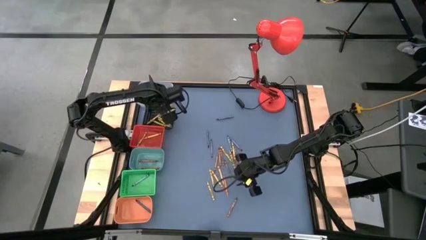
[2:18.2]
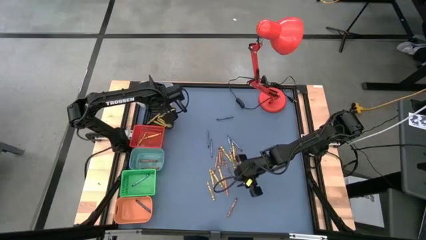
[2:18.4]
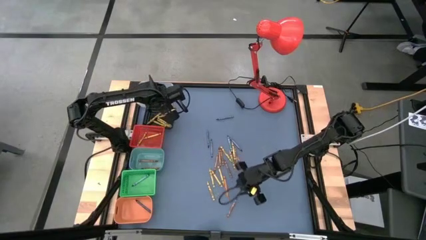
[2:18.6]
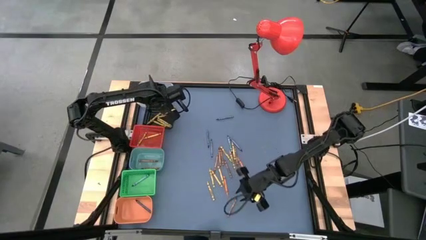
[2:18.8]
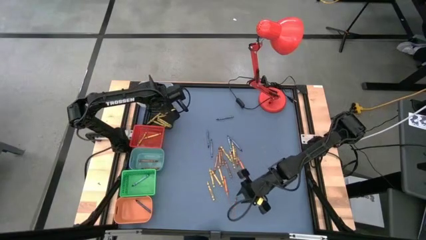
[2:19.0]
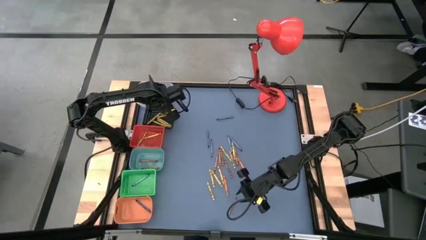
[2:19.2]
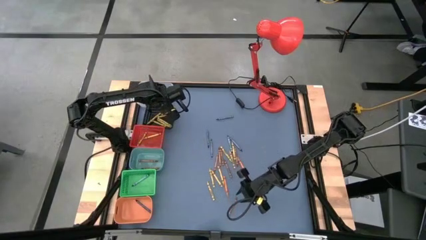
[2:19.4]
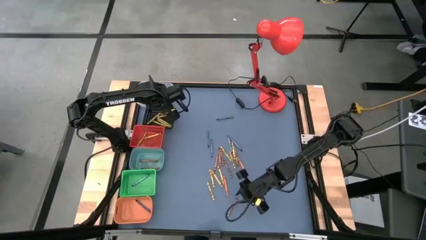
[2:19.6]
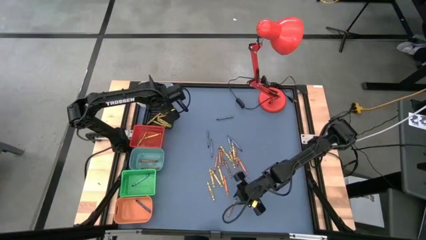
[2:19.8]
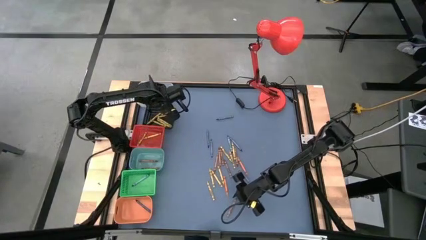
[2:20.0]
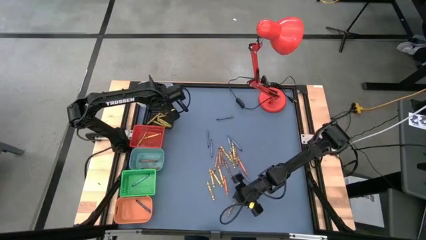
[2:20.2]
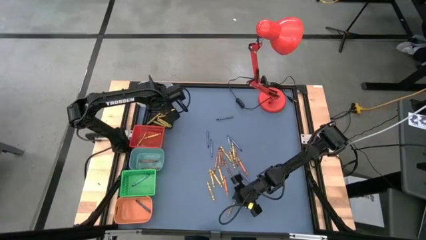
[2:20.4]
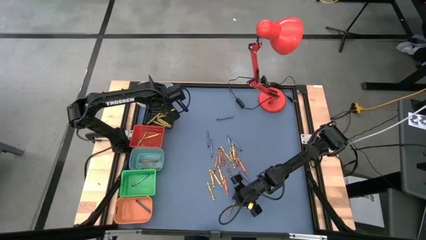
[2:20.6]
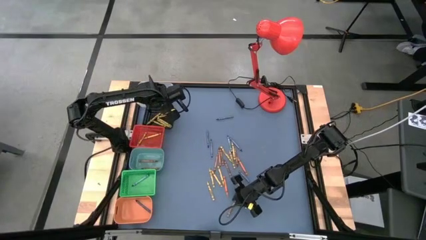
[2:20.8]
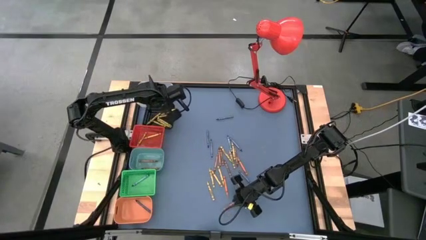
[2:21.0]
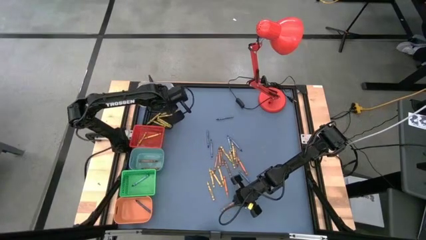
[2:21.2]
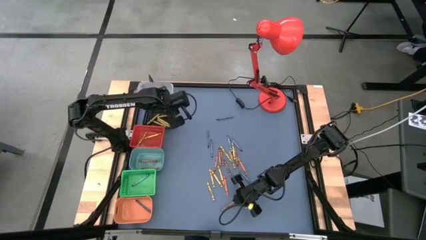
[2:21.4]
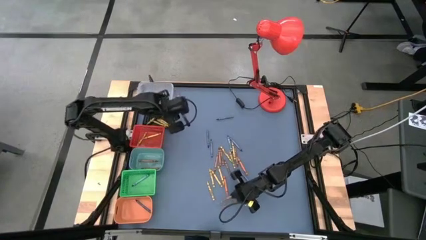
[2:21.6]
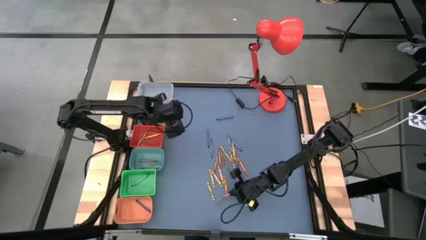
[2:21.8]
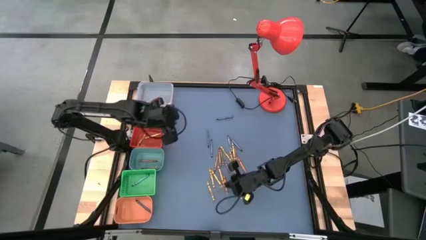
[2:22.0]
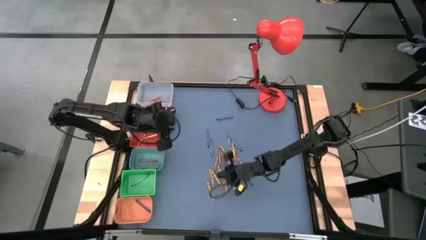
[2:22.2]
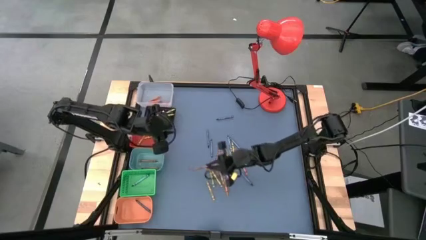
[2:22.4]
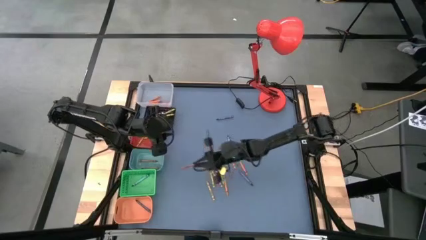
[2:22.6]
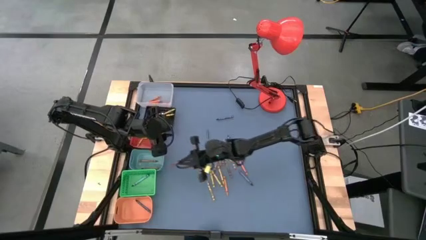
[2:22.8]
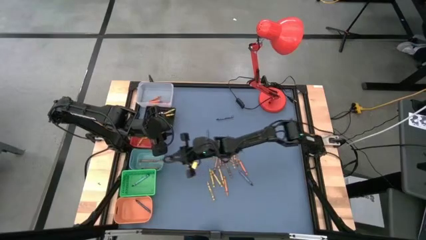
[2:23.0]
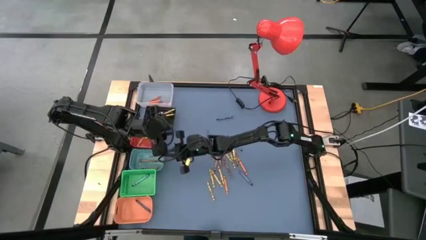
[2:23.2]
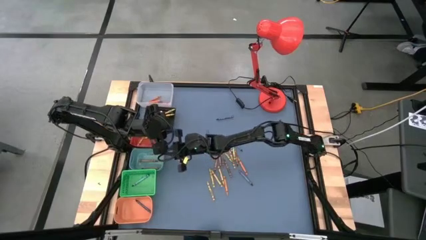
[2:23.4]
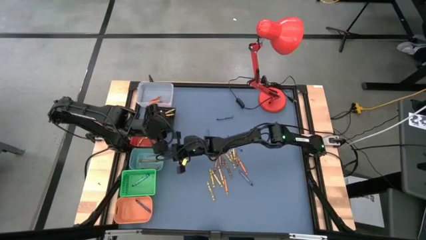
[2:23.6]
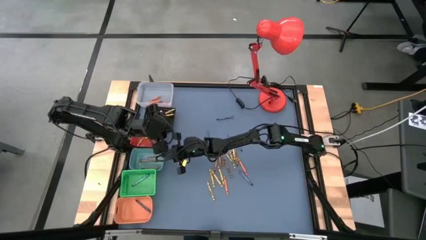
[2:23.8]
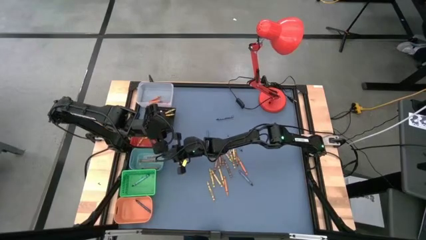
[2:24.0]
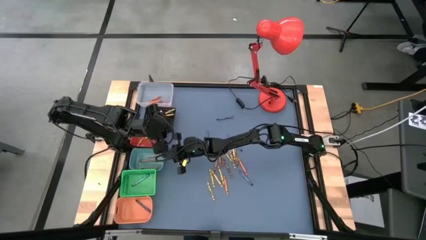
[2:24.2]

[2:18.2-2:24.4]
Task: Sort crayons
Put the brown crayon into the blue bin

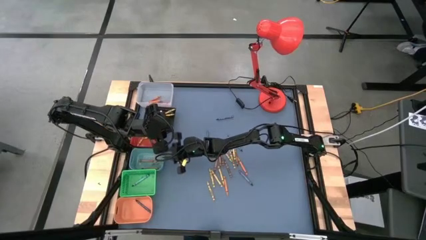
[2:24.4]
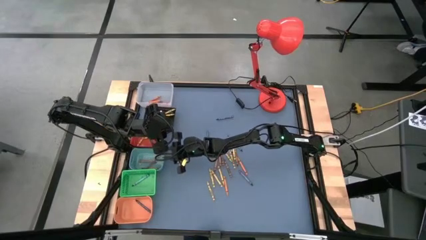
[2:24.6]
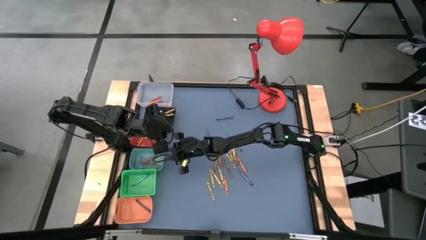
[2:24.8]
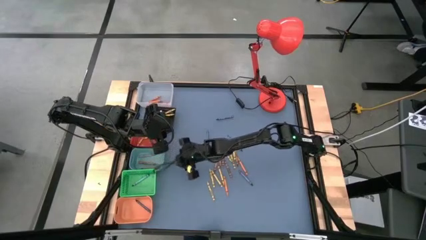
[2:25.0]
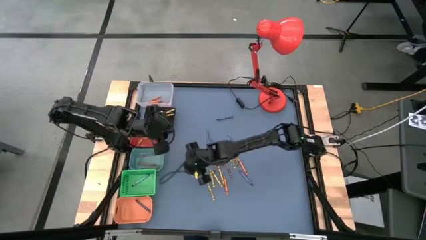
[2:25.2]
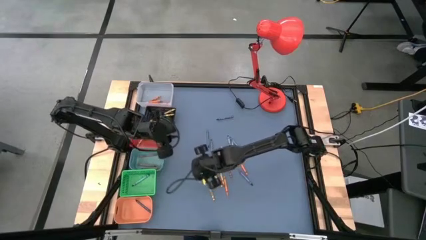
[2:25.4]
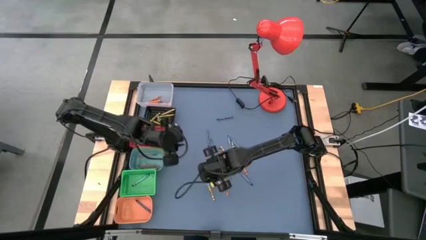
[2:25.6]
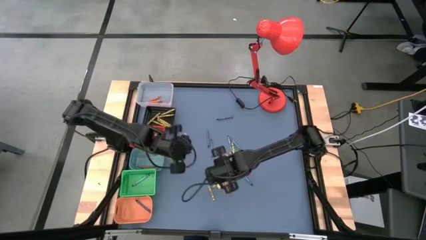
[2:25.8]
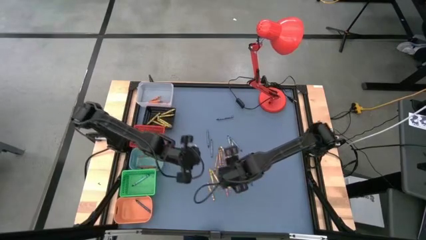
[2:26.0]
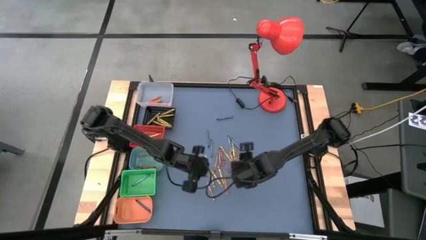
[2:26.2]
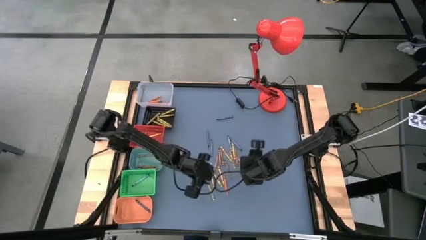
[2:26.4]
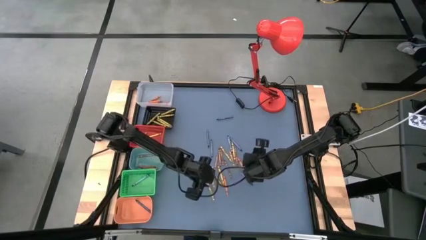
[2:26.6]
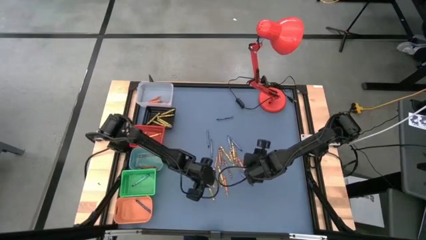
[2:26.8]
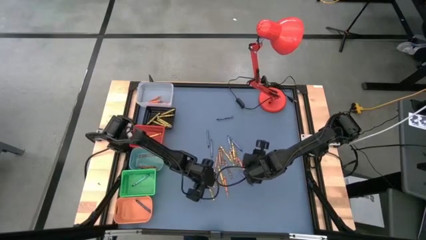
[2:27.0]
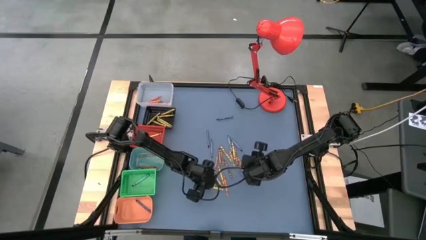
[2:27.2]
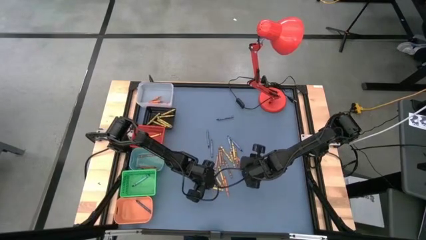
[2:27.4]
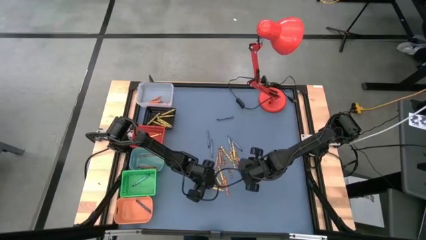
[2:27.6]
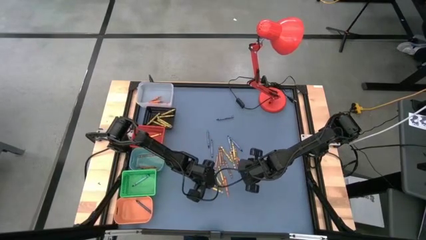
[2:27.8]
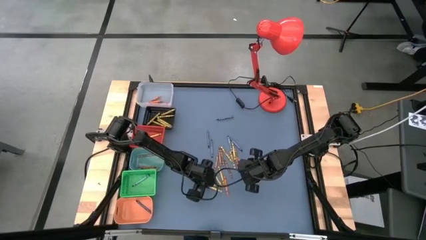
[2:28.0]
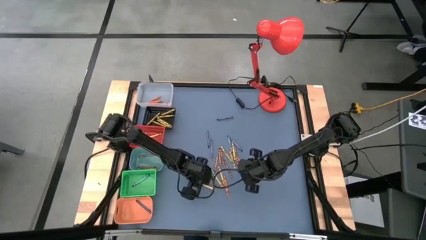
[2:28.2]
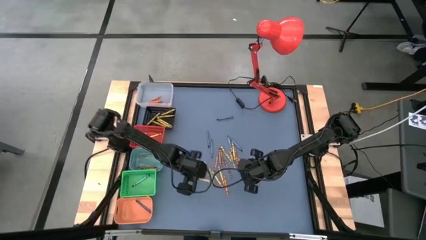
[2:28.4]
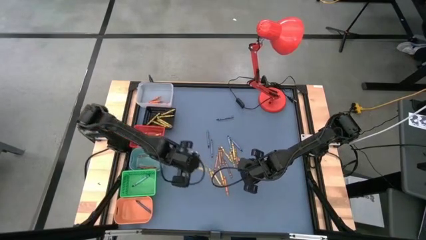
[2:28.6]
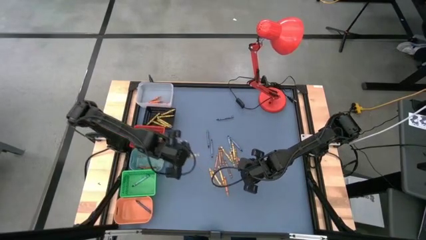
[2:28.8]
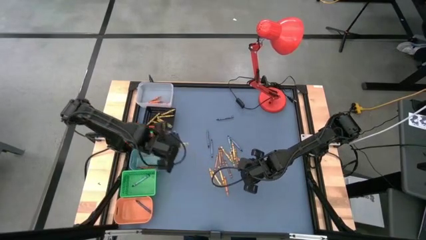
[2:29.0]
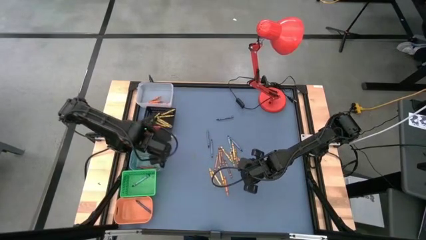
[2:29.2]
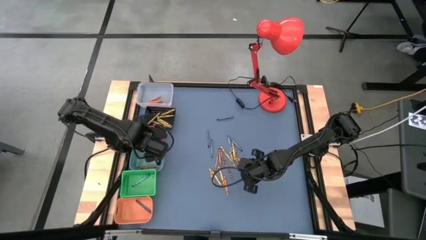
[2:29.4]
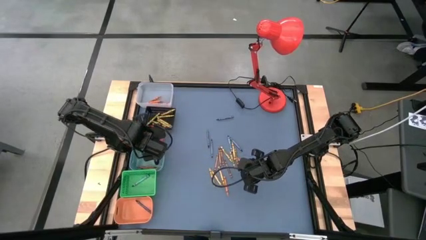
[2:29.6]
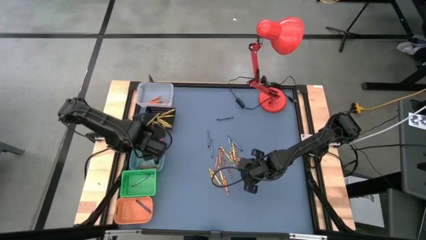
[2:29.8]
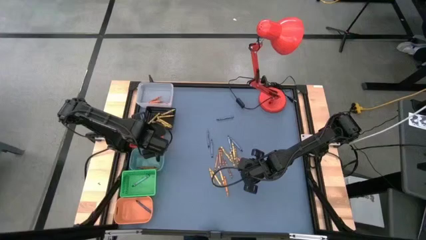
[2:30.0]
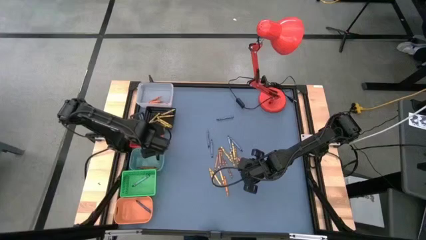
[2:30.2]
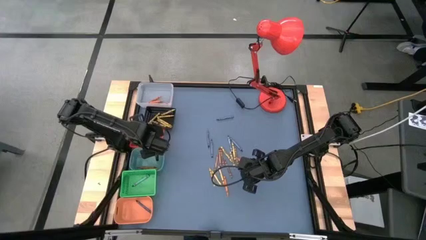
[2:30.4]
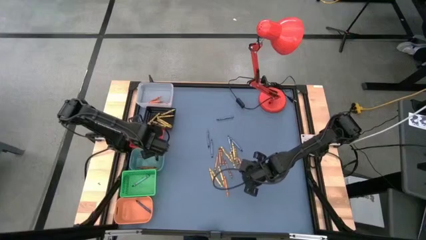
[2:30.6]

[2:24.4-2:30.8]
Put the yellow crayon into the orange bin

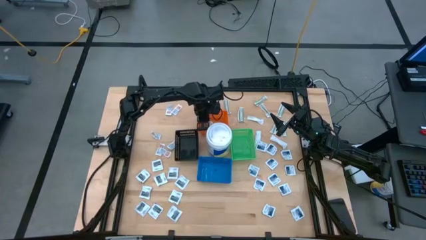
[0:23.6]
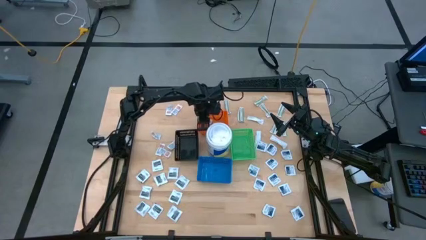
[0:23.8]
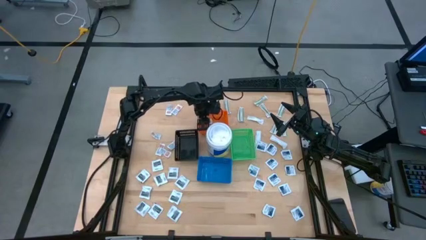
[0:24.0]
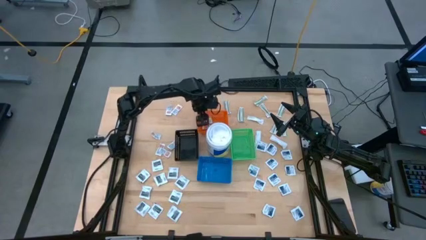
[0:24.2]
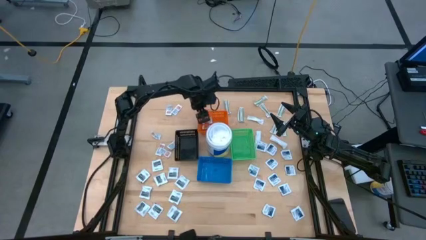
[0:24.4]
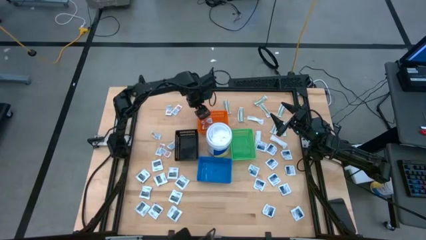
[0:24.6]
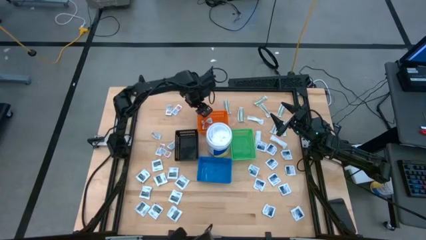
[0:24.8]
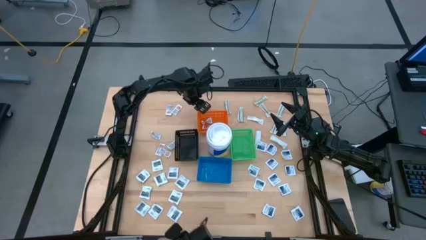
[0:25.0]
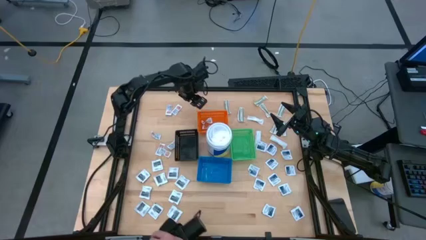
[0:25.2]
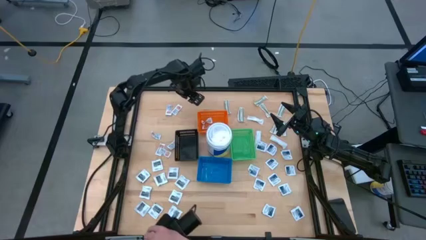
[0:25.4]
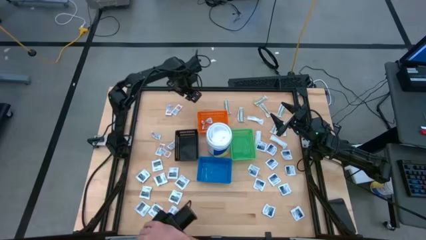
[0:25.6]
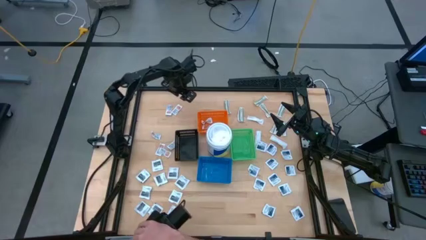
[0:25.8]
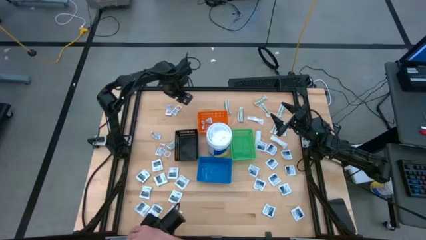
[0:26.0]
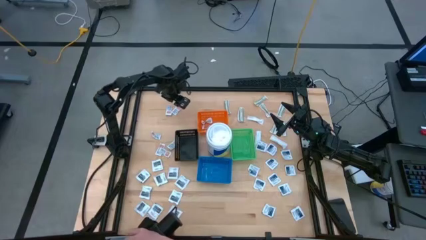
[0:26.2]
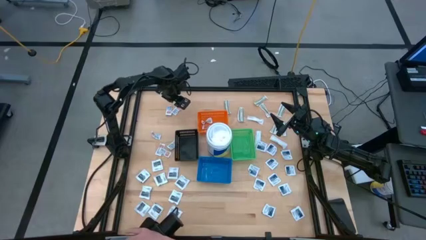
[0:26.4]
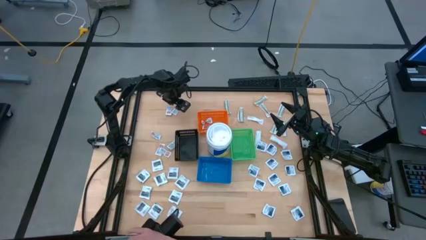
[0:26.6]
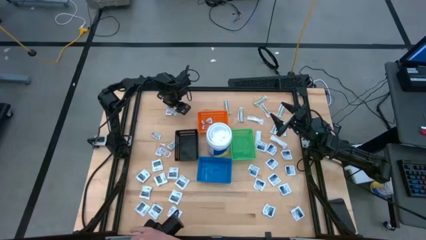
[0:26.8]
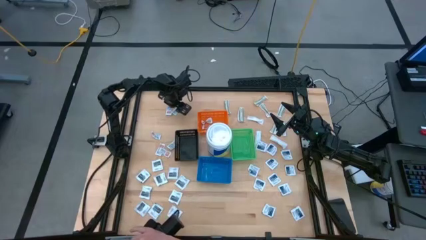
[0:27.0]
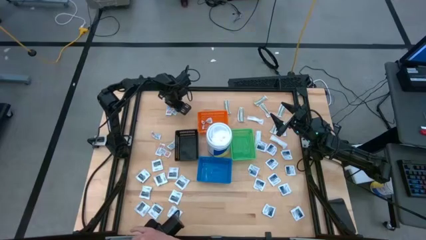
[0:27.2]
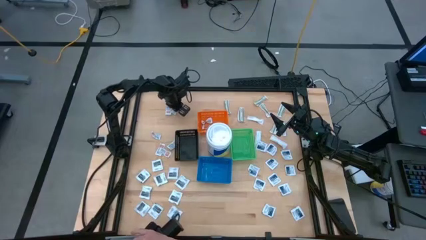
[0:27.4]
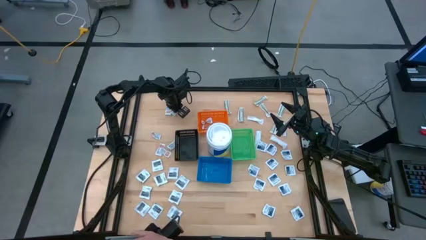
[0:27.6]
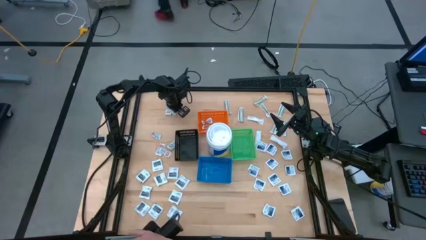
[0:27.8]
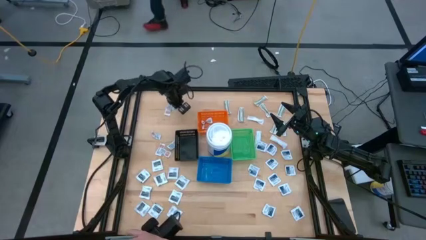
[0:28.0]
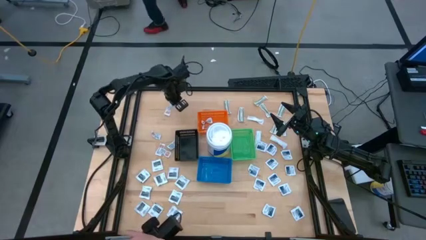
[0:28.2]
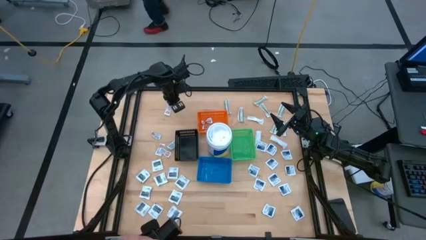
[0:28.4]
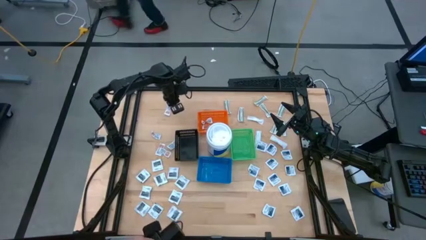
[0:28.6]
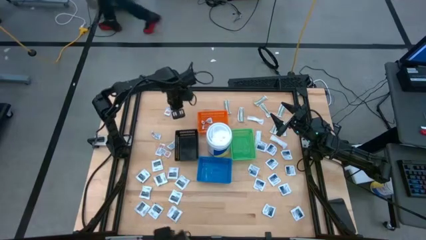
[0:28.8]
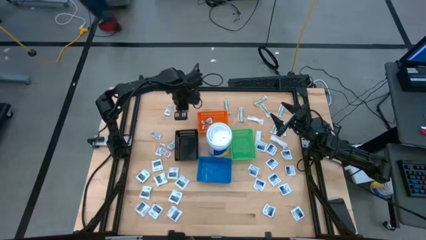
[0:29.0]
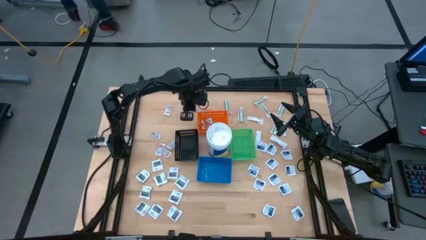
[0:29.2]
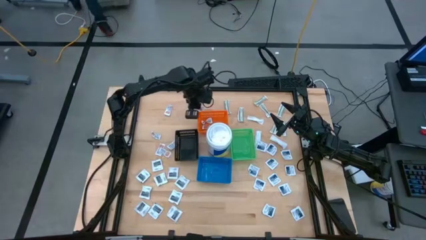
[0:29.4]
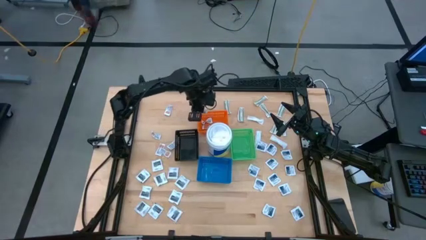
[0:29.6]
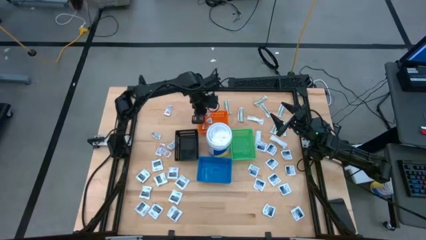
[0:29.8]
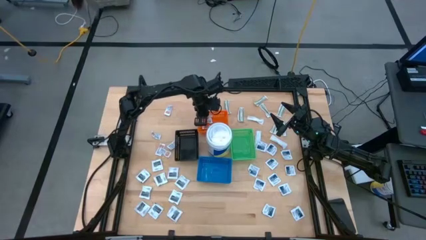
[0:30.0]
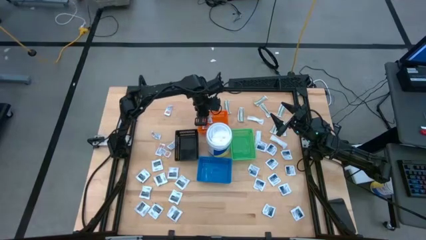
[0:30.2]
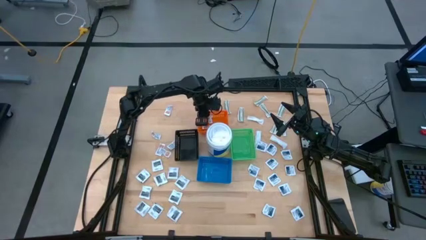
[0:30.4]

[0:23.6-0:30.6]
Task: Pick & Place First Aid Supplies
Put the orange ointment pack into the orange bin
